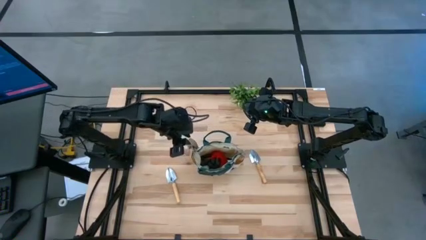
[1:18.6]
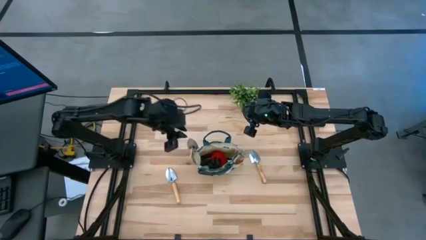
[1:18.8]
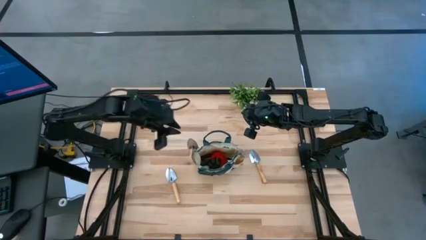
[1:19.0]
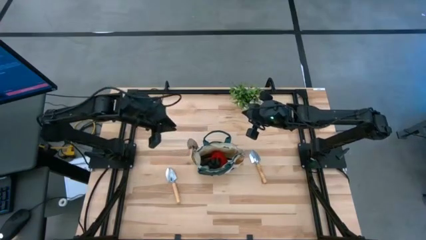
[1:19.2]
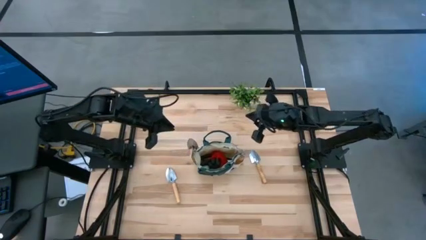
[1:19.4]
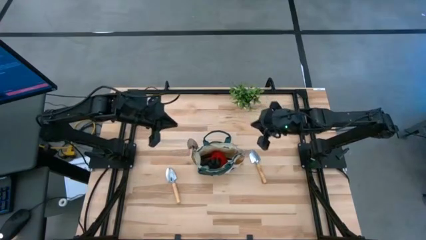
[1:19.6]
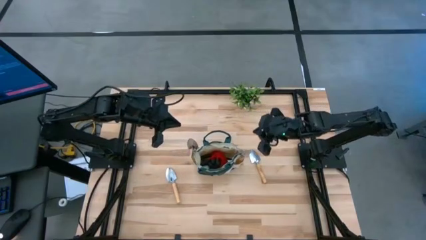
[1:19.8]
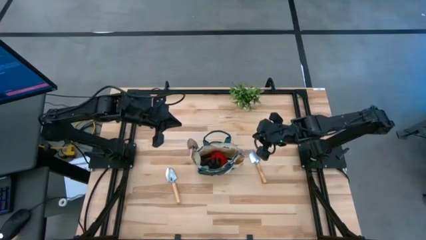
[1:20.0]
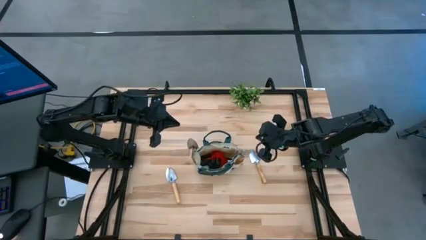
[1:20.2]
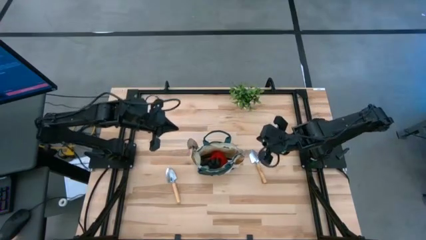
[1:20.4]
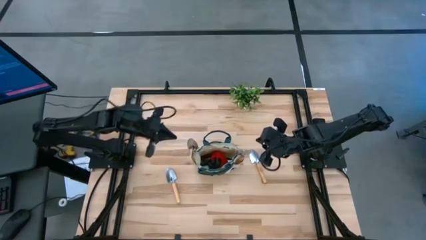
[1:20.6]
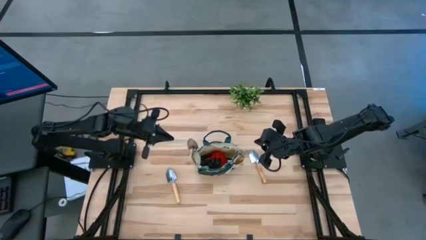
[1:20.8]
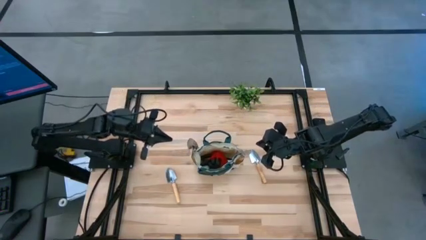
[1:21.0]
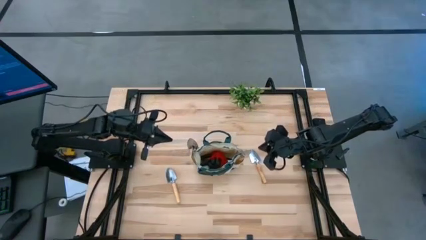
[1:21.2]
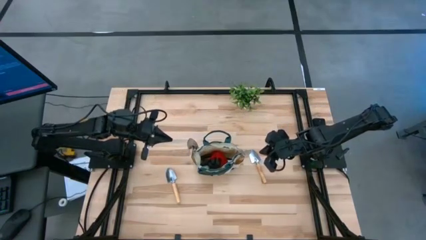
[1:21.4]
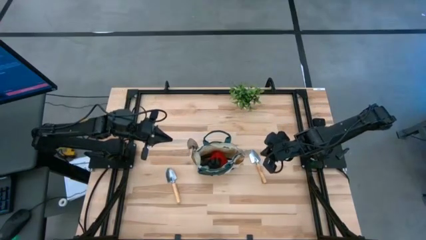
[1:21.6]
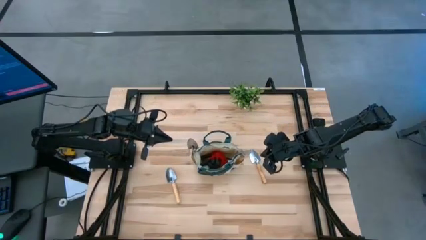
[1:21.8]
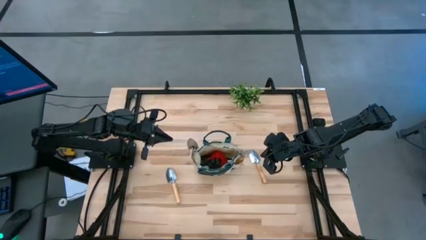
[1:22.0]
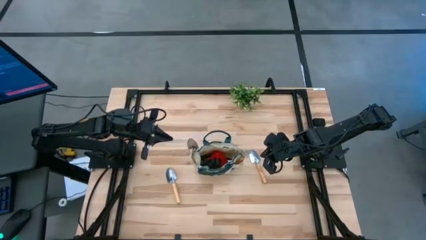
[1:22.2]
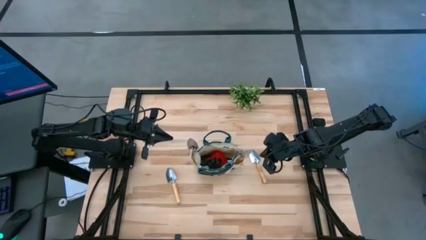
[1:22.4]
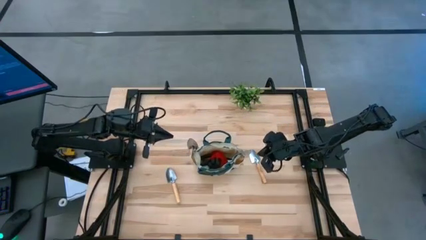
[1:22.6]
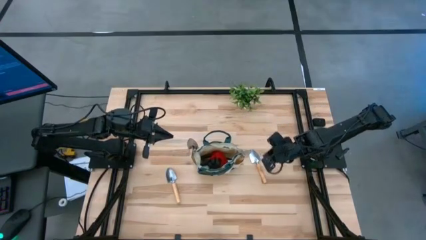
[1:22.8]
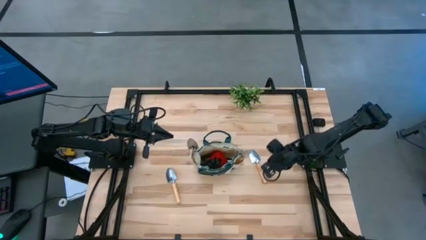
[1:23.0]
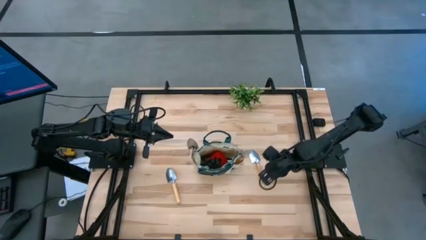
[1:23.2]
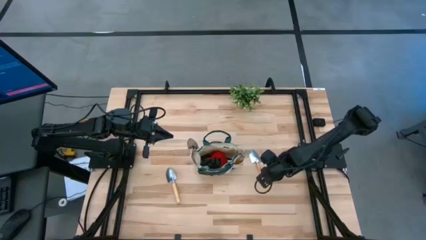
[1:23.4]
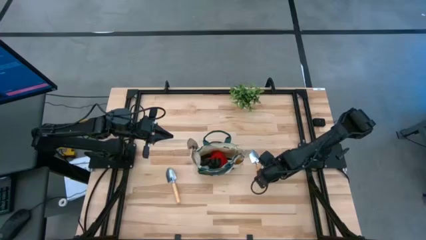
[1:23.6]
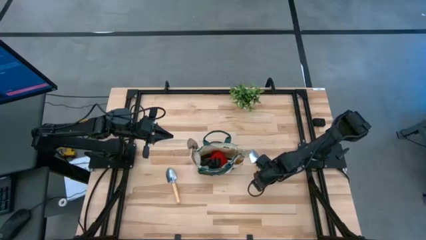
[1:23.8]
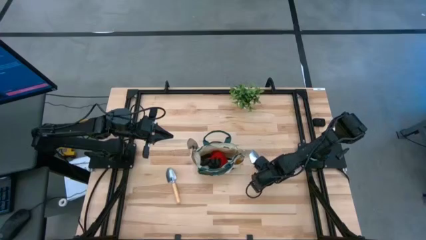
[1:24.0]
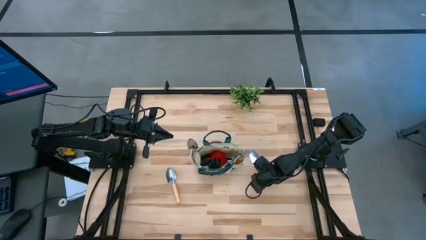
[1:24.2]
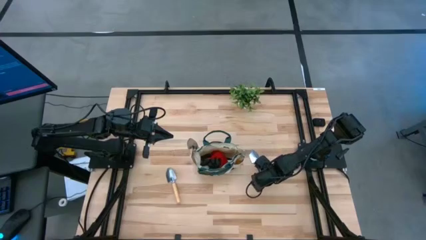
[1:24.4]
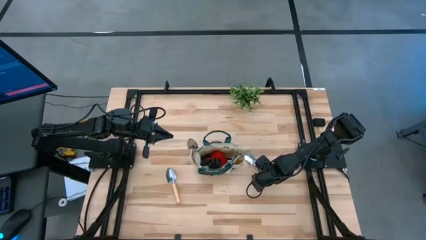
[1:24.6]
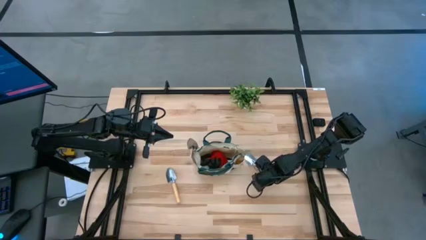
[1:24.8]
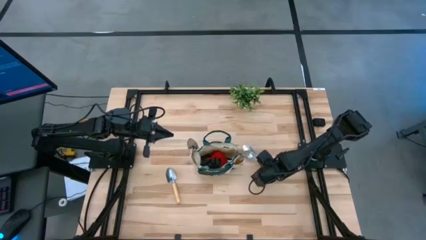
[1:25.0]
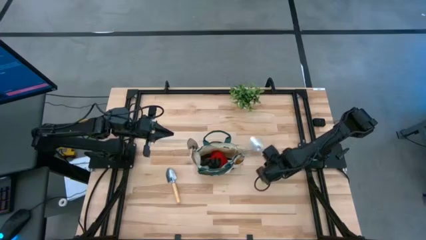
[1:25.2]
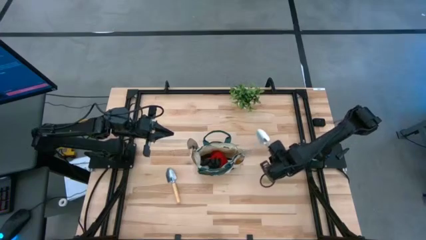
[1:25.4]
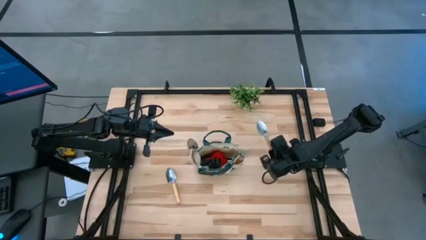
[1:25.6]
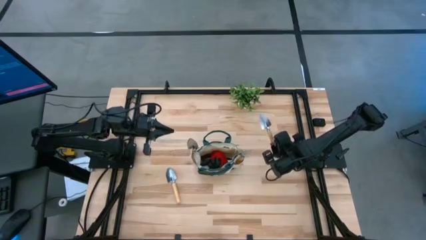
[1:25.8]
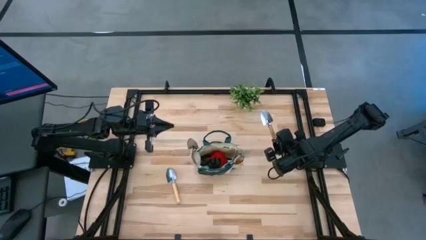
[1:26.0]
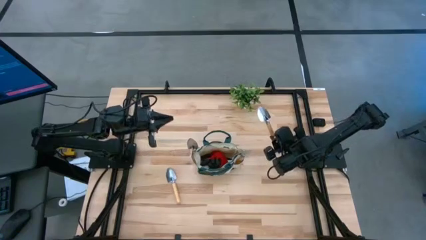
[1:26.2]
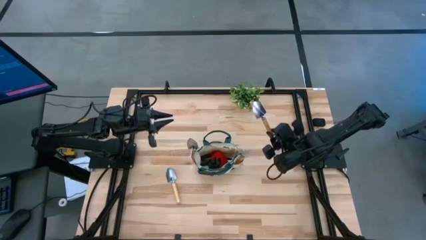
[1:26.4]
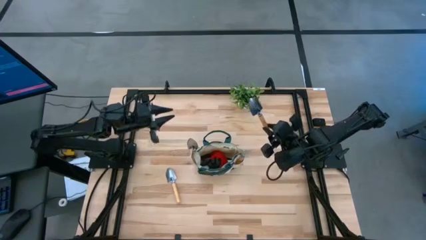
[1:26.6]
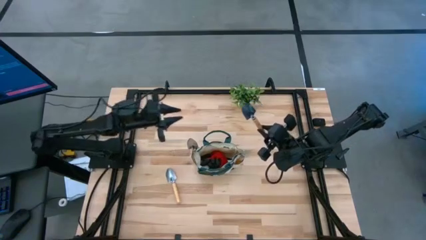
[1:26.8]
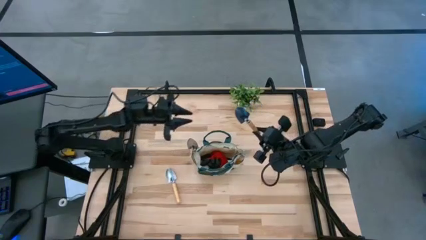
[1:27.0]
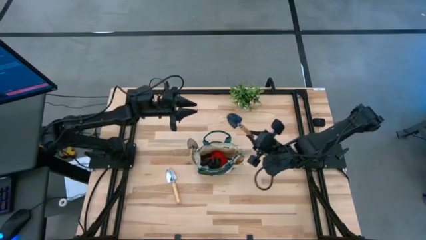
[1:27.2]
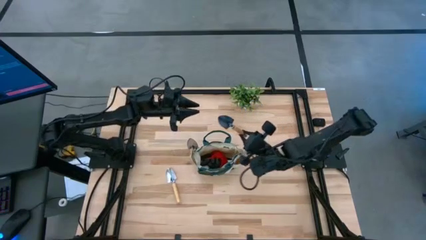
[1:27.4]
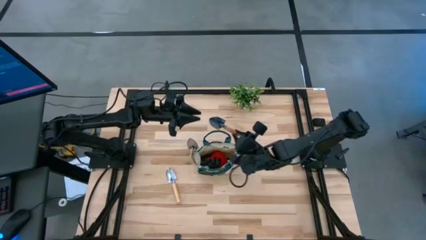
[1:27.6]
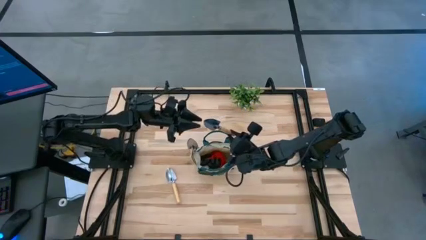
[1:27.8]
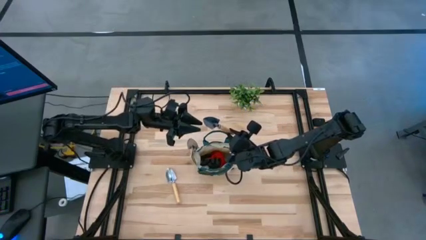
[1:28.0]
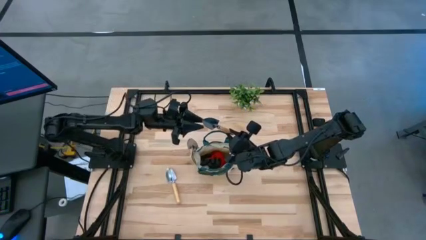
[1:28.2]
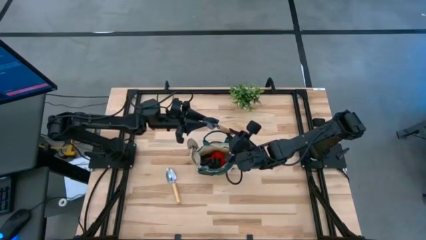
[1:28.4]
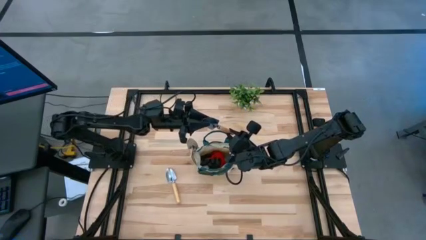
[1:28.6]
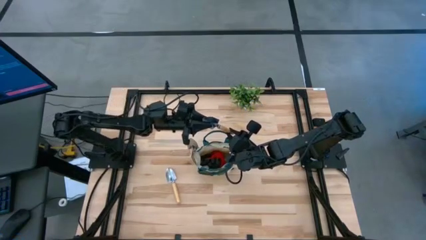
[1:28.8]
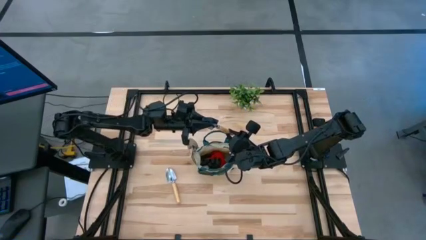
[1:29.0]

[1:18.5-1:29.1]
Task: Pick & Place Garden tools in Gardening bag
Put the brown trowel into the gardening bag
